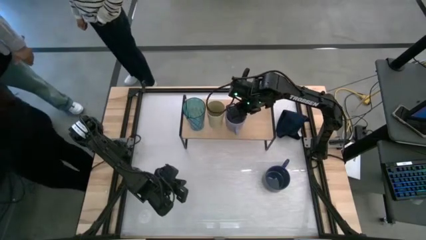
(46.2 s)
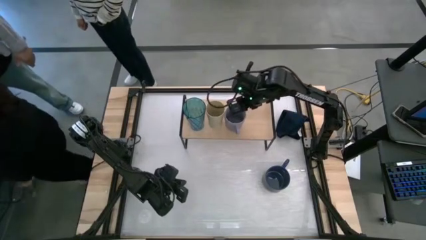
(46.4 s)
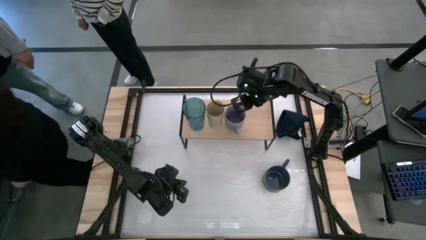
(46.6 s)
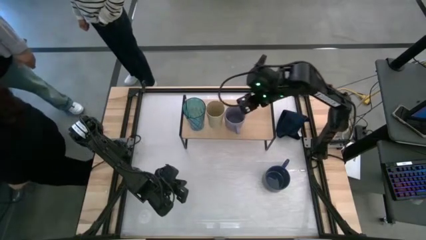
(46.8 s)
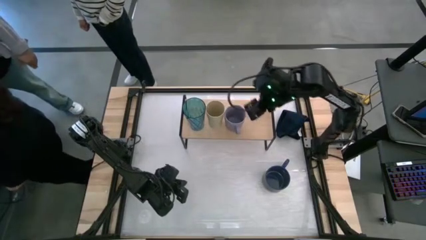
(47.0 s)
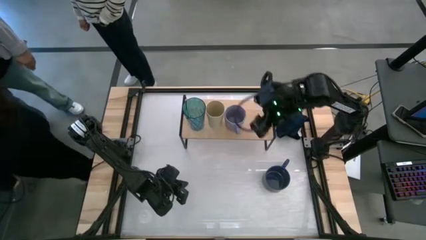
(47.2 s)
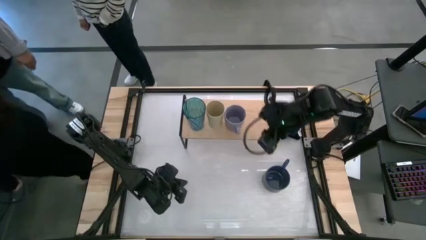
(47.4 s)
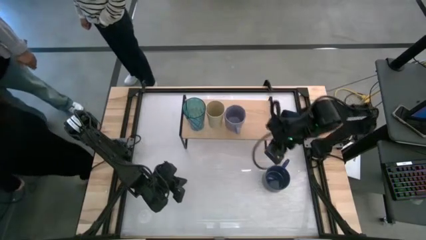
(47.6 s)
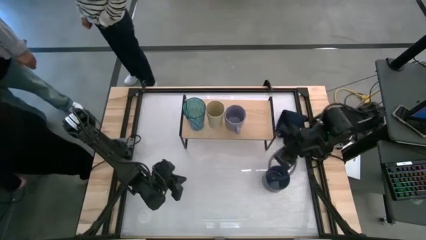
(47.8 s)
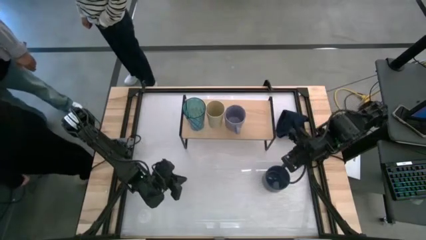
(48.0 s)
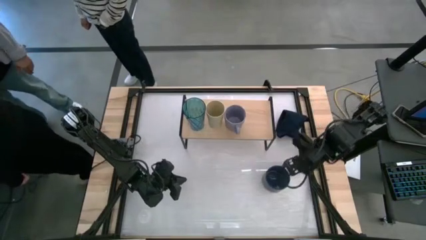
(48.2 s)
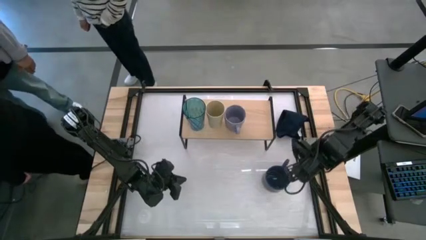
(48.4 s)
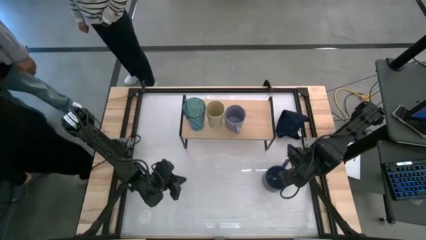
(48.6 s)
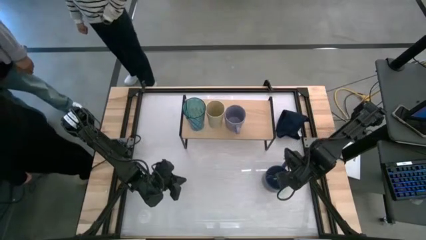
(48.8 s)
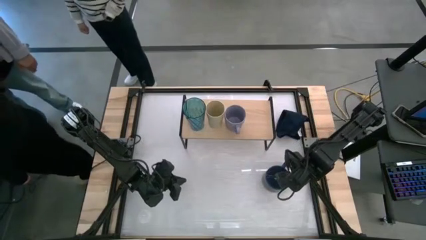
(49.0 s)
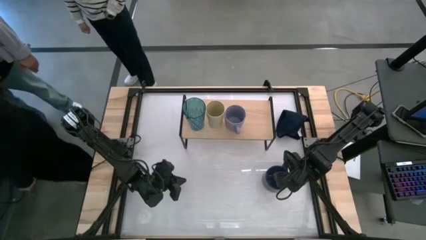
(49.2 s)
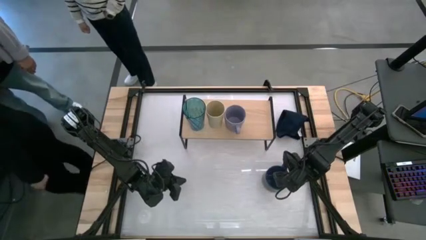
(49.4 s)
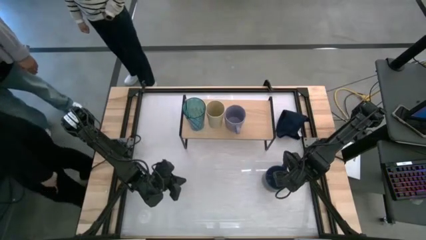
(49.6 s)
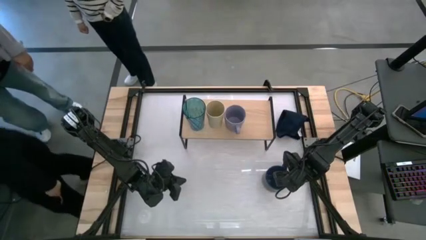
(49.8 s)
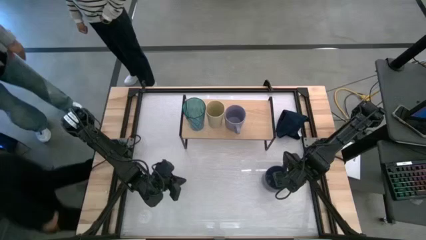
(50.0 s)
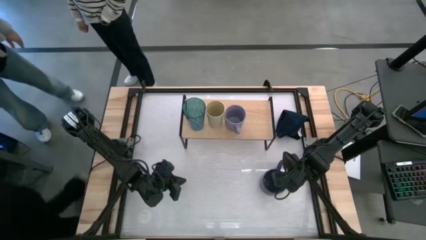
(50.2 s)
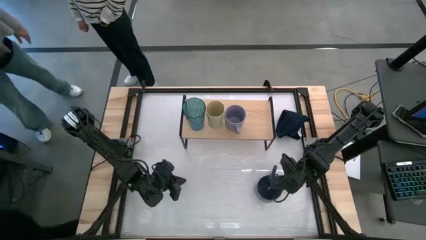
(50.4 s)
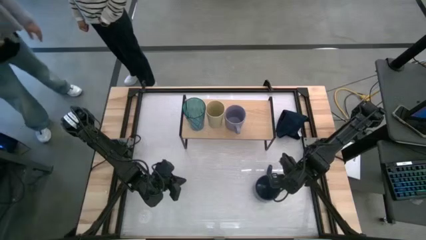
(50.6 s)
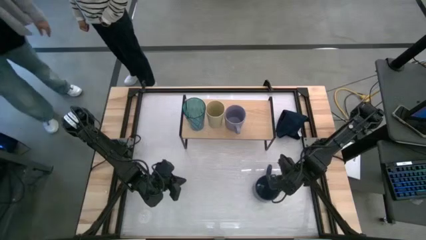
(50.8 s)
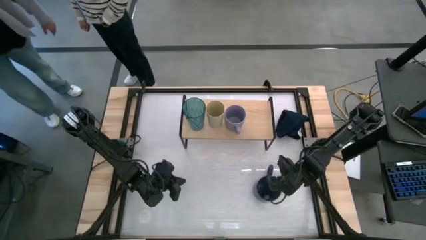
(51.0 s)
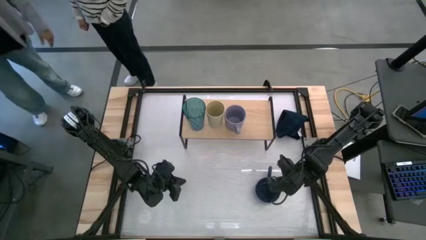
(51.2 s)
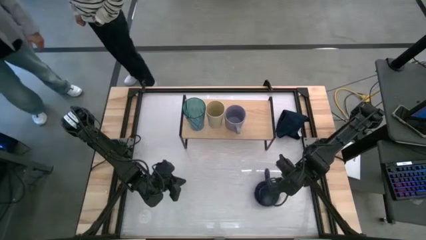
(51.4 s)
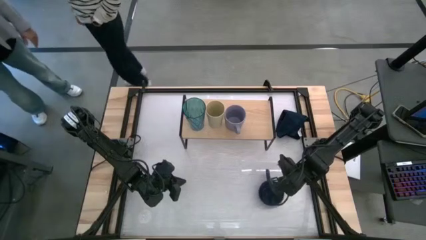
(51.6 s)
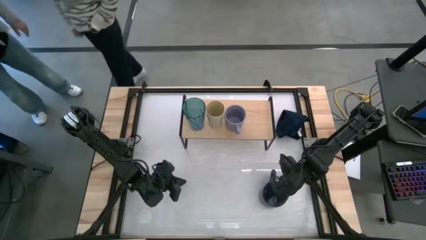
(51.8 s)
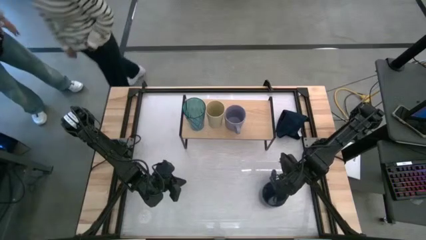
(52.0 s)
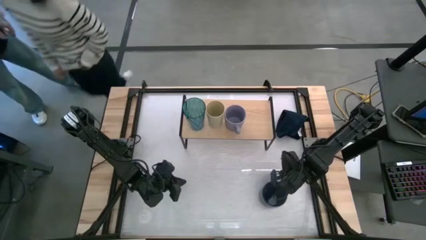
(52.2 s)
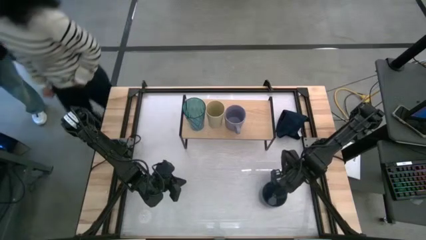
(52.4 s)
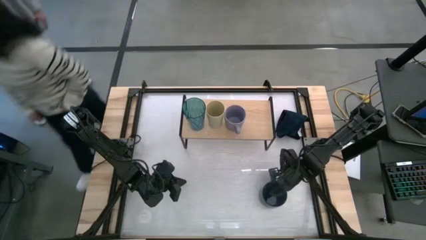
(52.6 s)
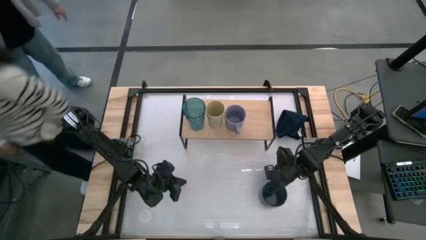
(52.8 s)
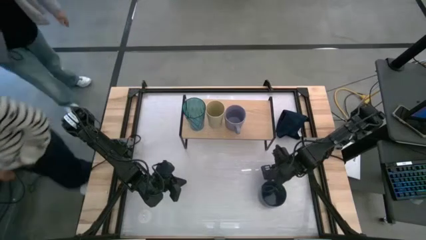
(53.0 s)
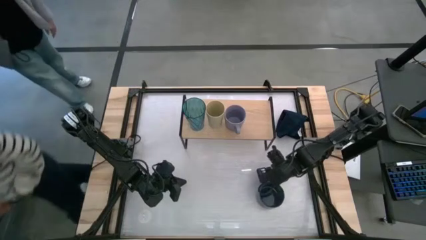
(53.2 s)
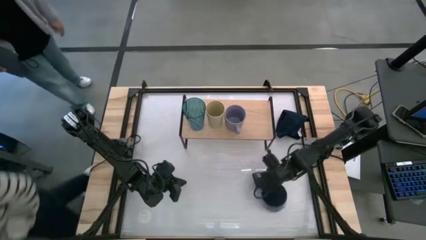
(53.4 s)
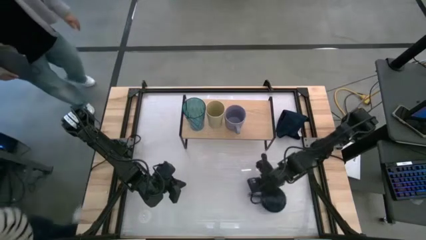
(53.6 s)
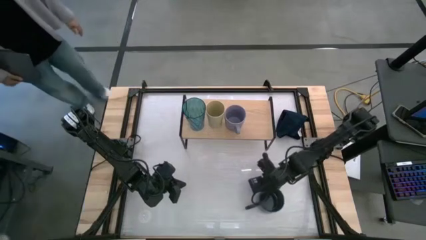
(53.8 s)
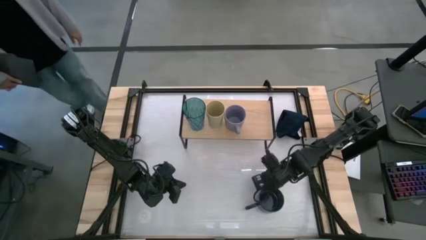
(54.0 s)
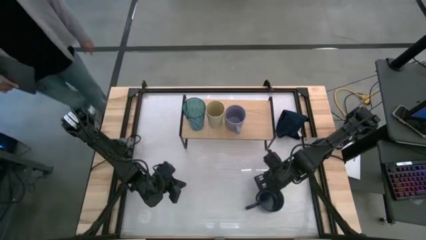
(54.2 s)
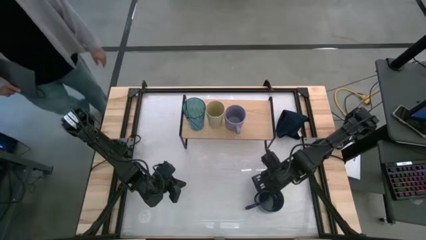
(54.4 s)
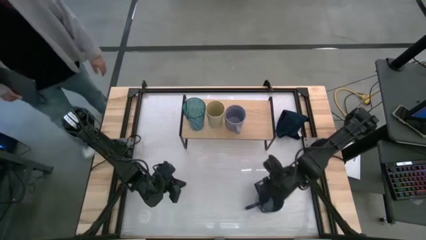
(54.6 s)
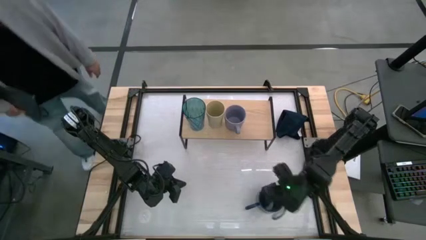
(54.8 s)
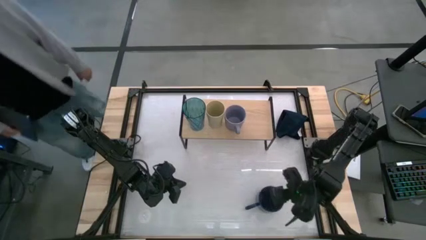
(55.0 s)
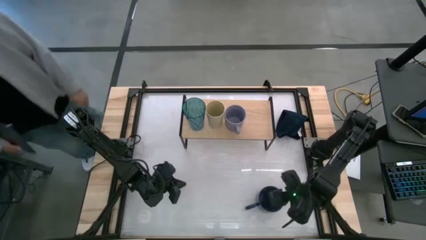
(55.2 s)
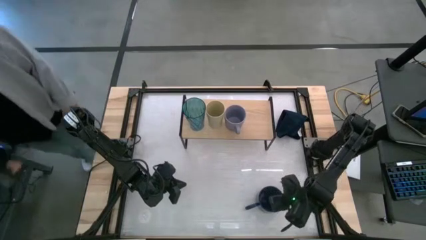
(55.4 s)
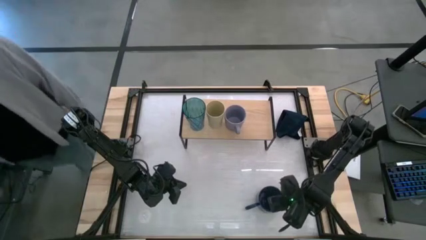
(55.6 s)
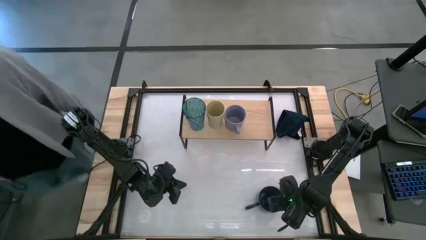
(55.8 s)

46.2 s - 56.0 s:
Task: Stack small to large cups/mugs on shelf
Put the blue mug on the shelf
